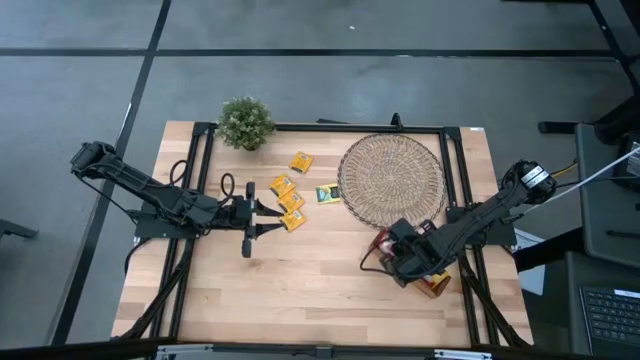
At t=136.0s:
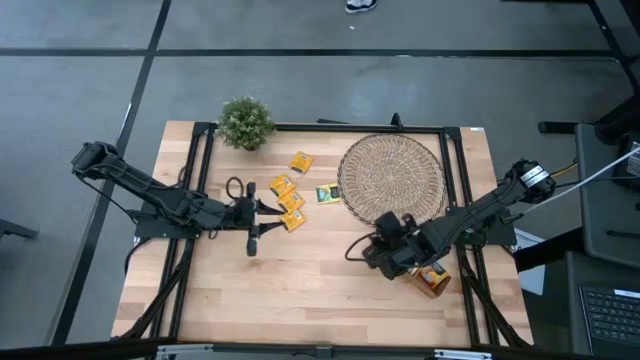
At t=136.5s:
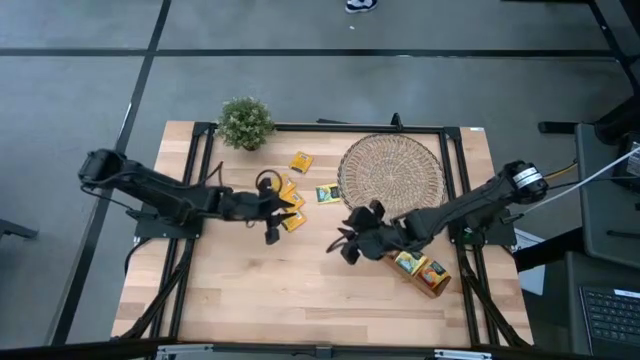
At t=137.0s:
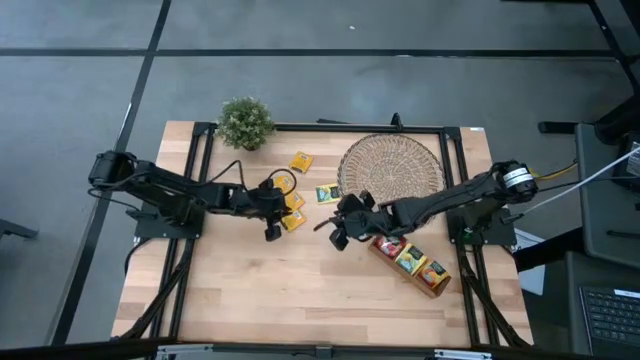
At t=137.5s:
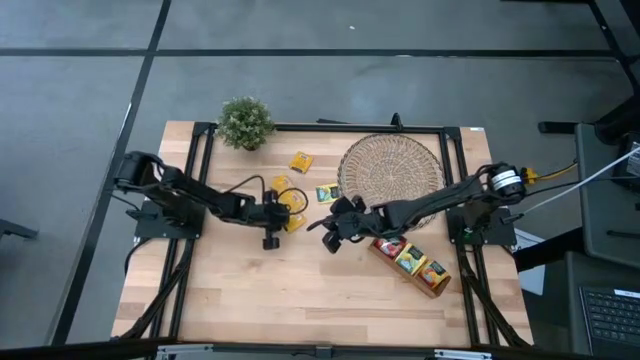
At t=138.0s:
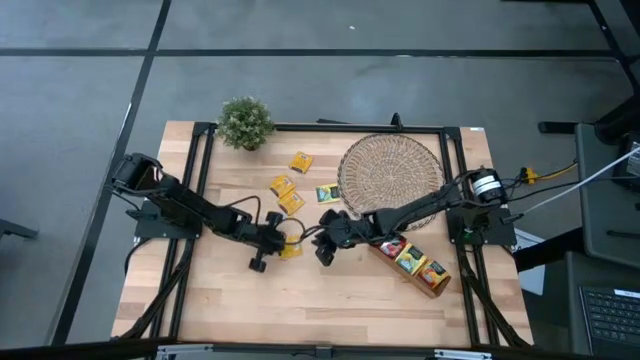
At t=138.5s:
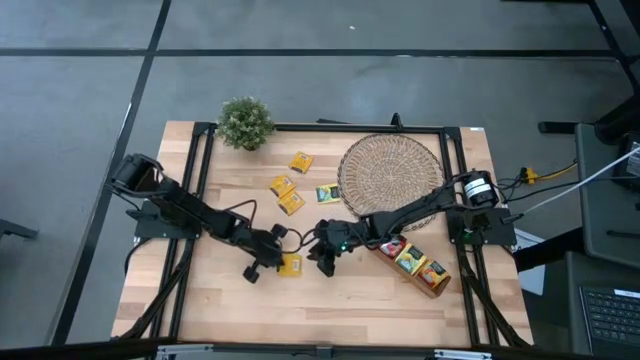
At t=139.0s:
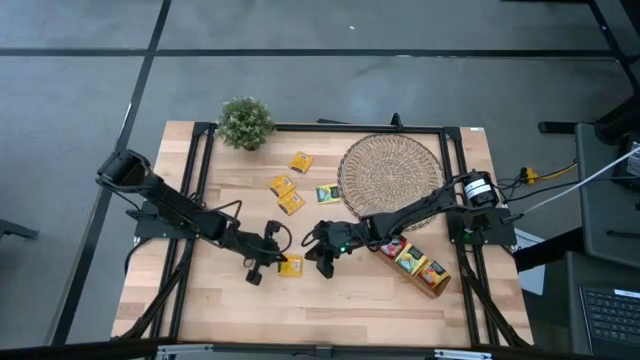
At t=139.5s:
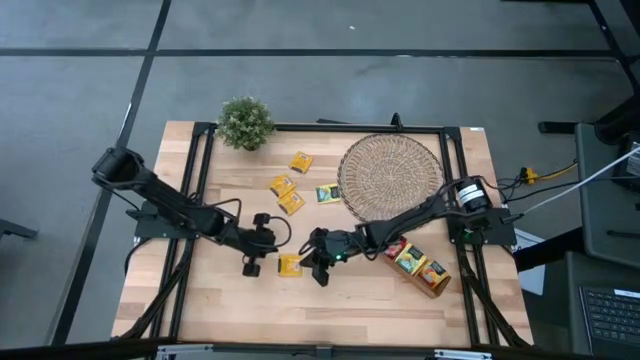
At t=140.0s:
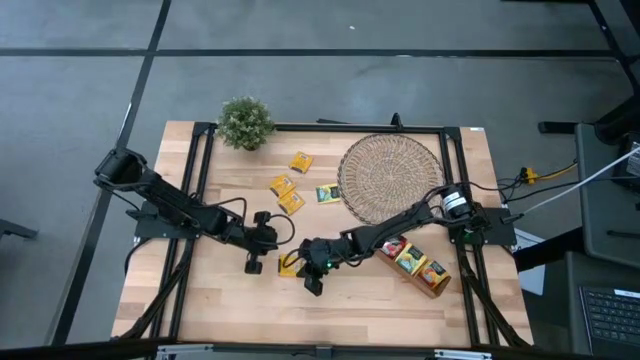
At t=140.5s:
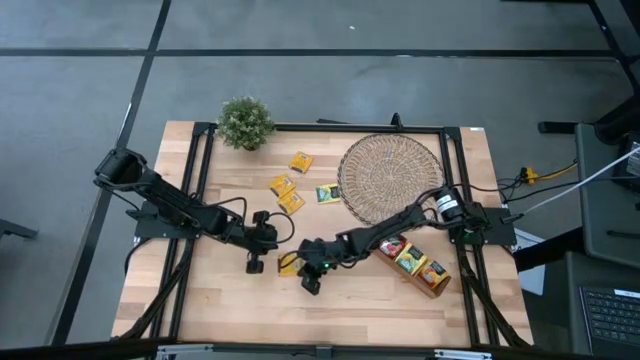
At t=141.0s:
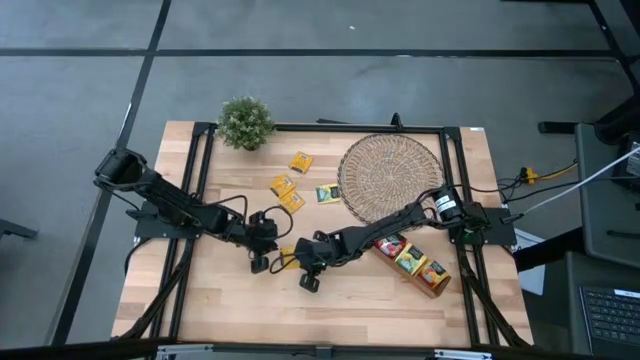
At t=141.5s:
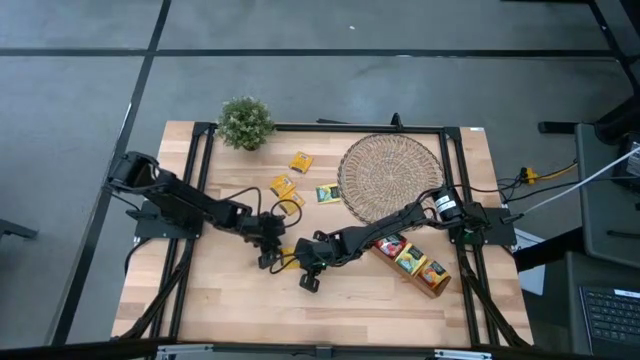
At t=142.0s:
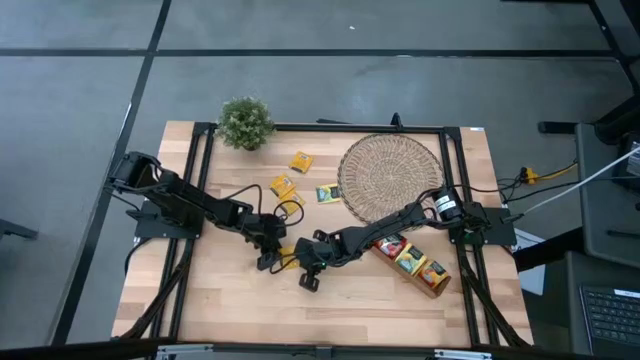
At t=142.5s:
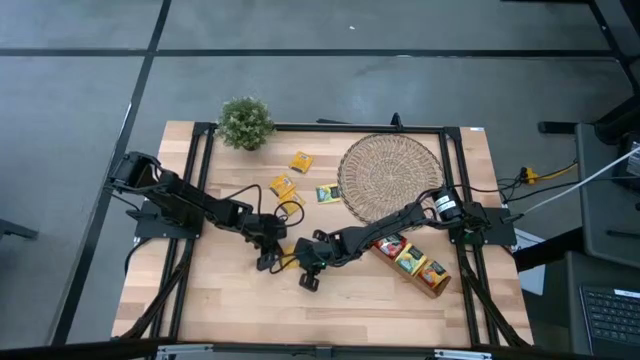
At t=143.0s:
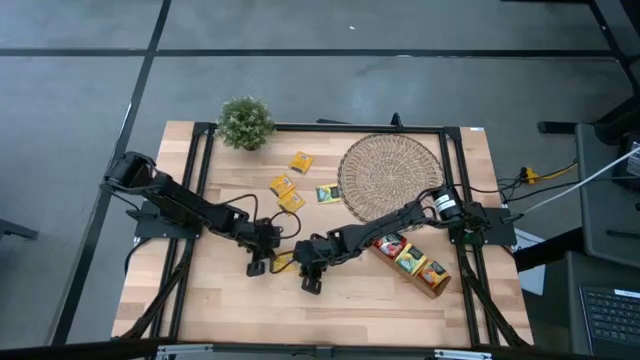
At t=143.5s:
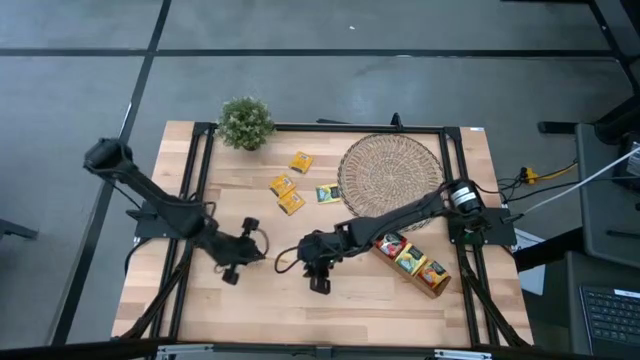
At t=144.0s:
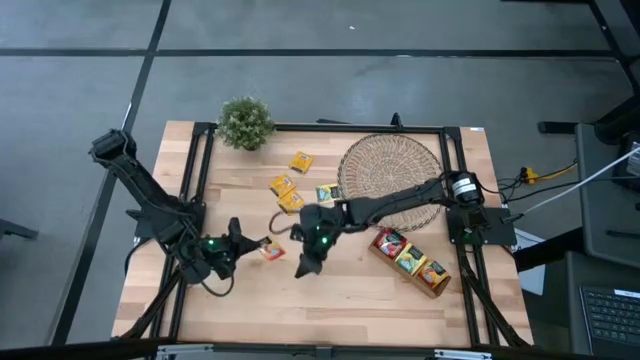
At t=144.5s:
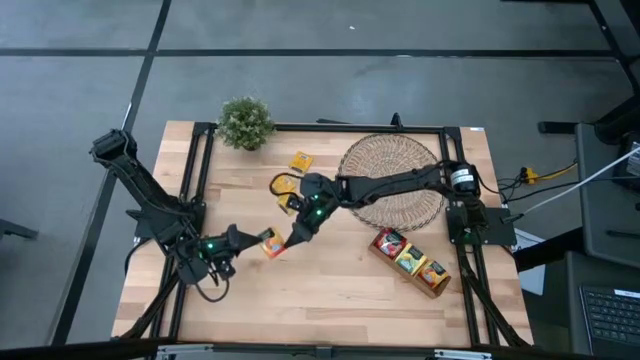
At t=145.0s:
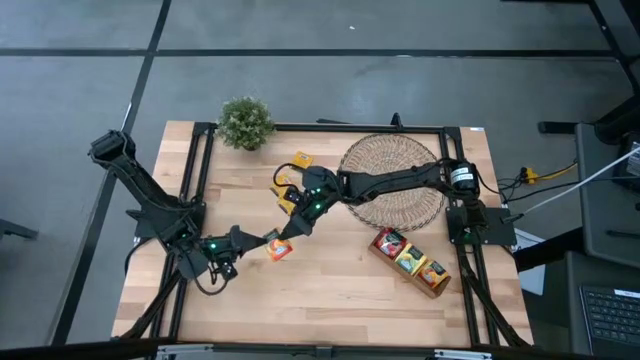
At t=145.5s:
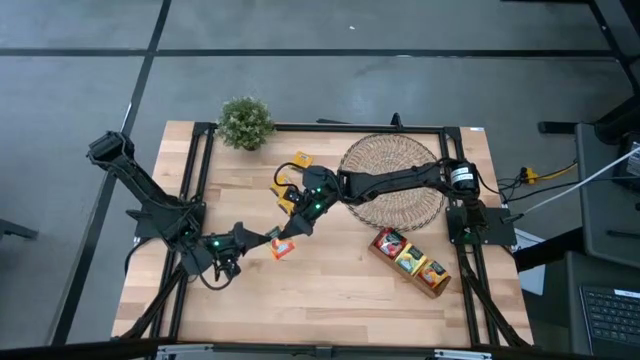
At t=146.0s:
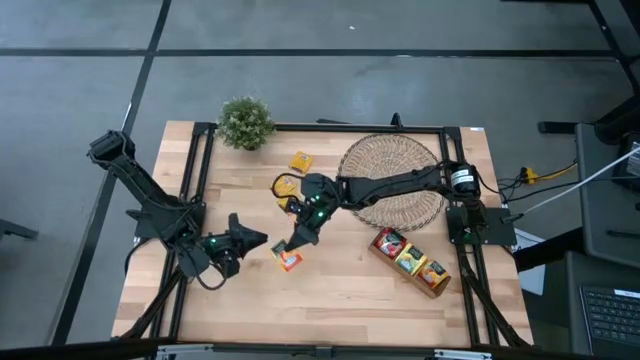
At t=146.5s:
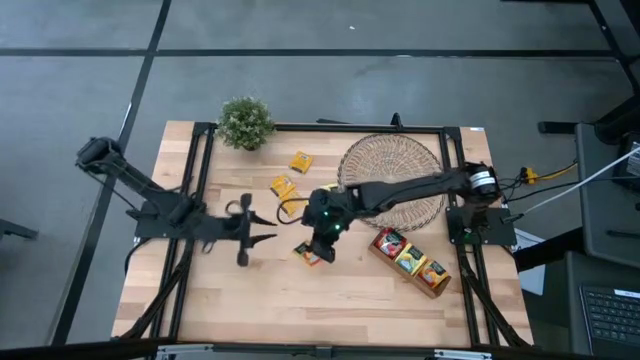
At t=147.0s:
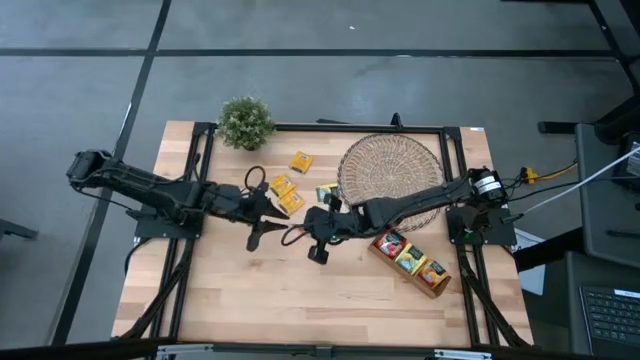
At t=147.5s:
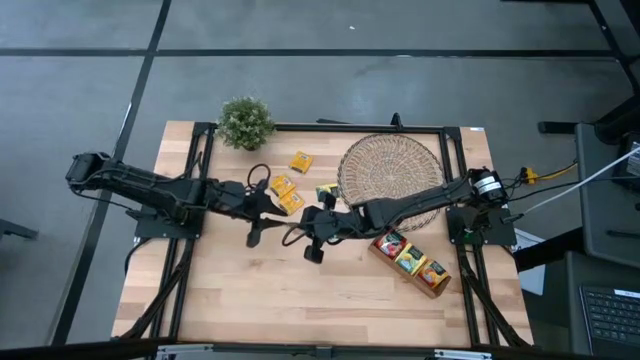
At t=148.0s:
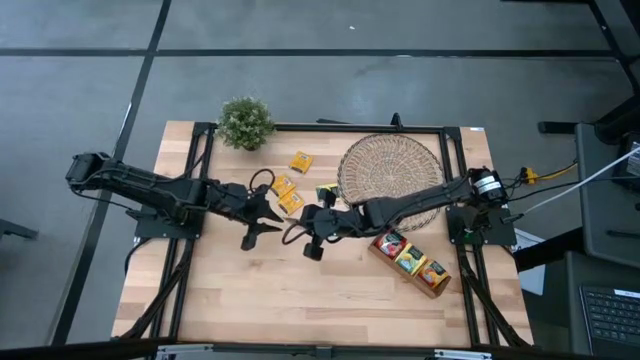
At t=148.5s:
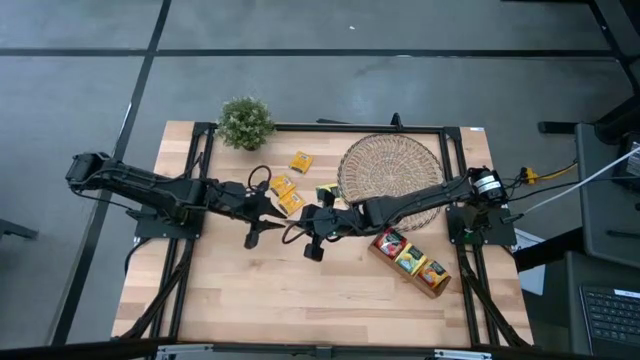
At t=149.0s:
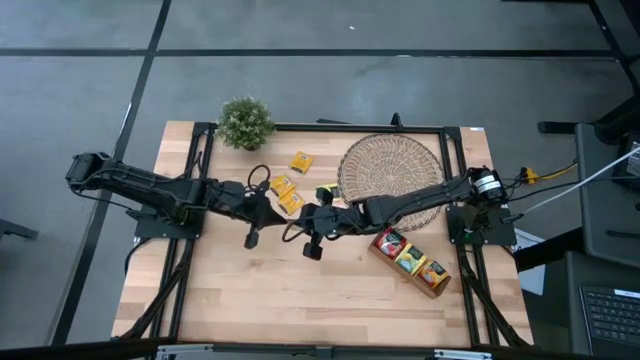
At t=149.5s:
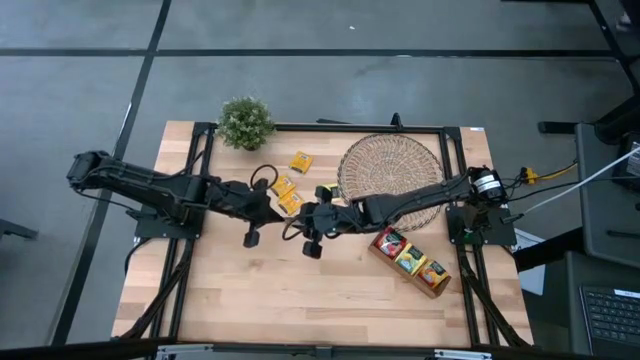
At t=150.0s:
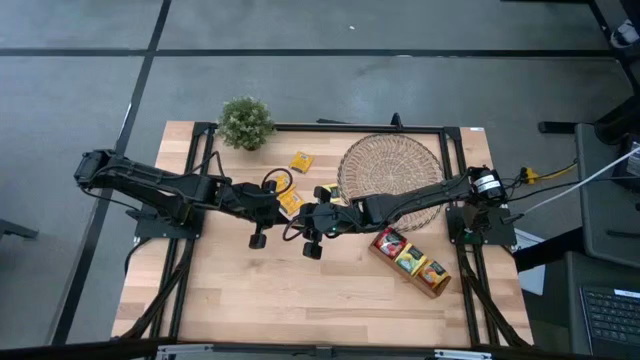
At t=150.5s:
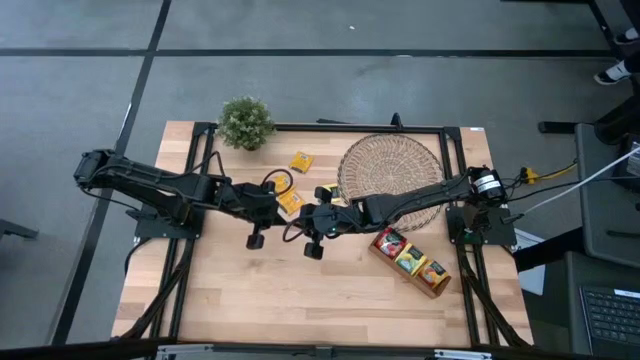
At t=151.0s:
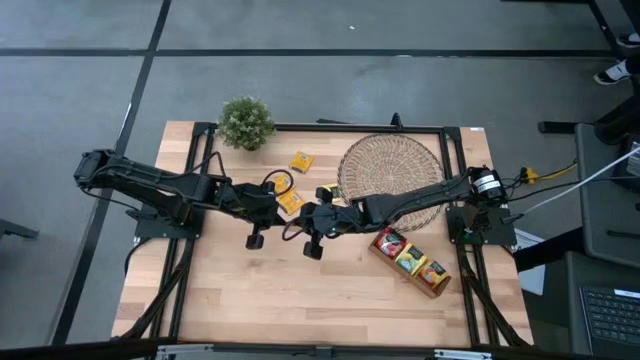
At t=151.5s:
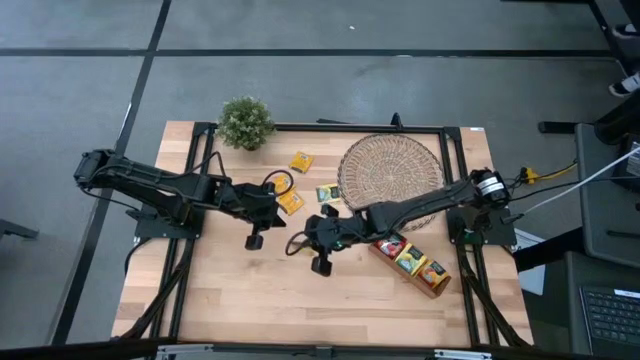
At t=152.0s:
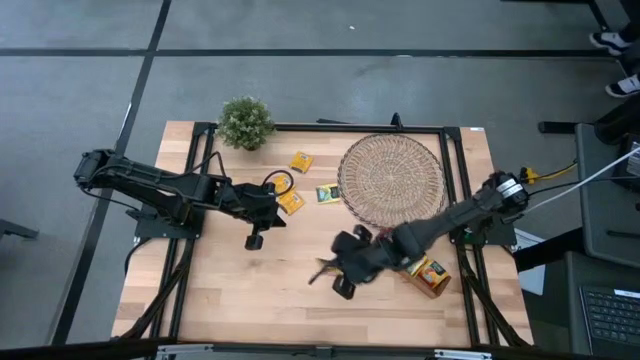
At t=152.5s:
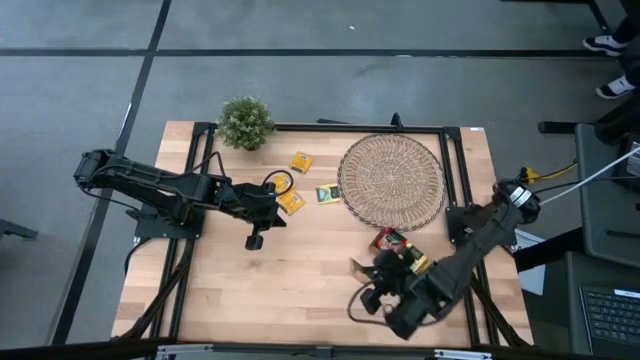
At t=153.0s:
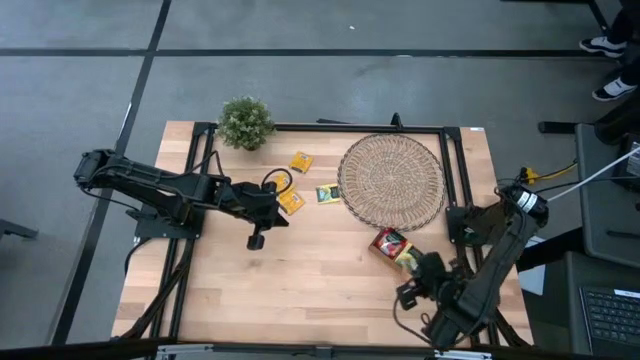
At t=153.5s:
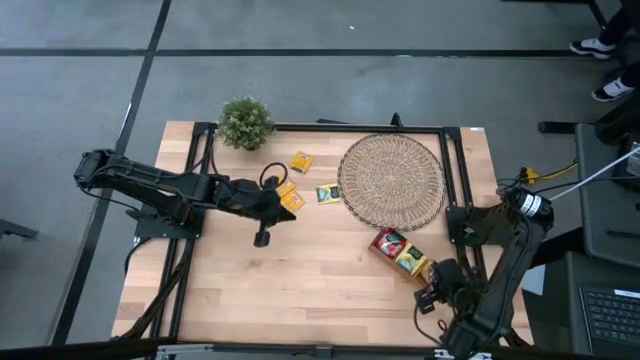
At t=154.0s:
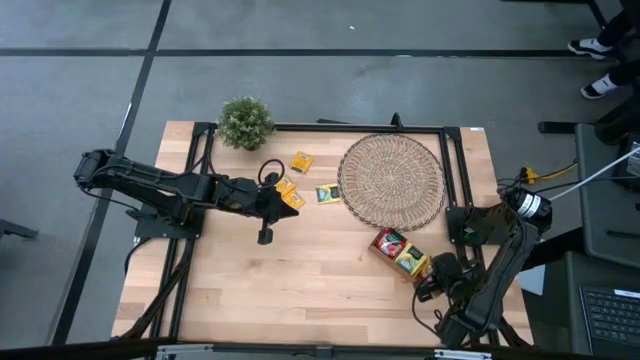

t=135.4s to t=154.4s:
Task: Pick & Place Tea
Put the orange tea bag into the right slot of the wooden organizer

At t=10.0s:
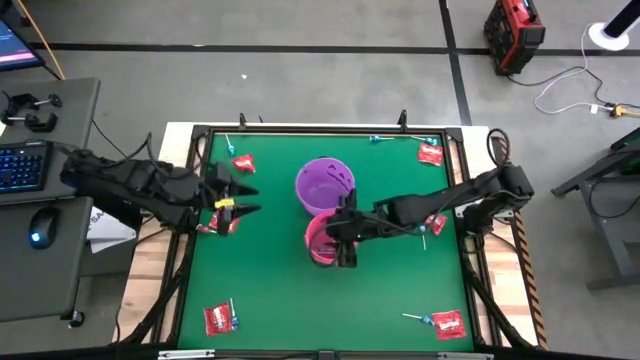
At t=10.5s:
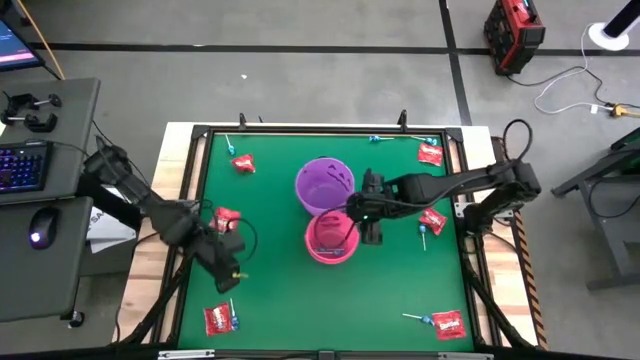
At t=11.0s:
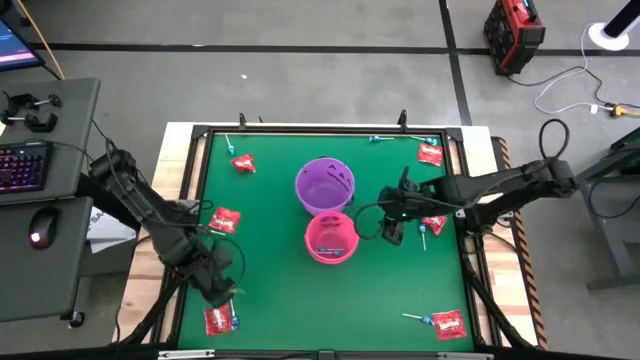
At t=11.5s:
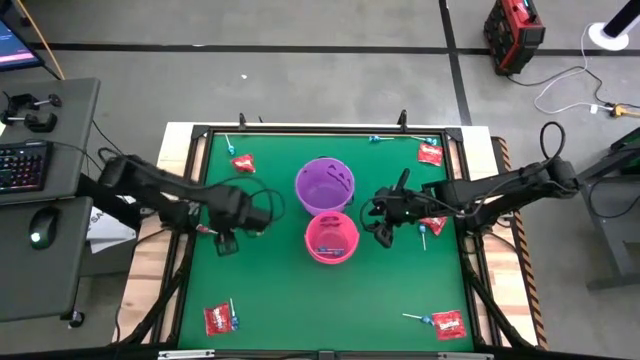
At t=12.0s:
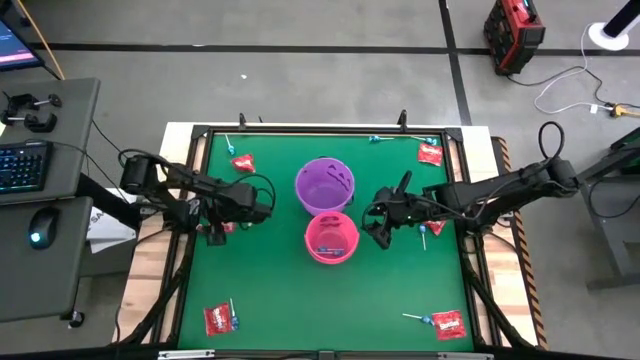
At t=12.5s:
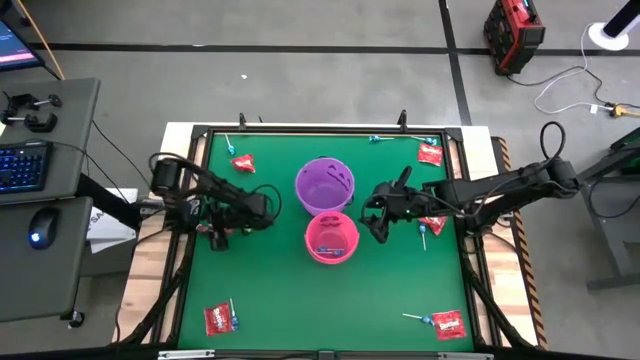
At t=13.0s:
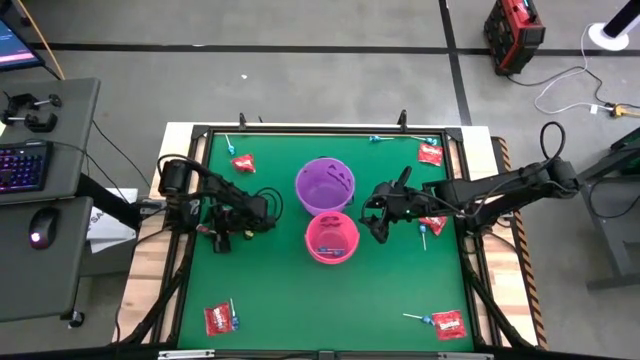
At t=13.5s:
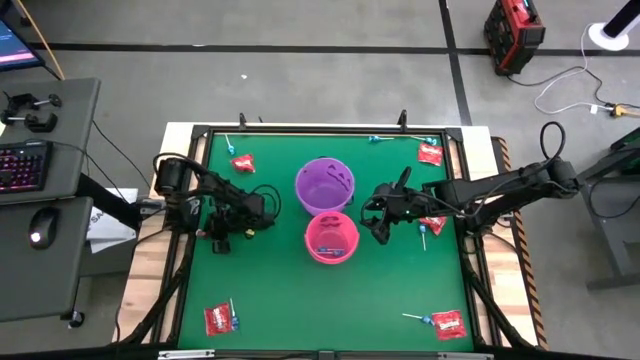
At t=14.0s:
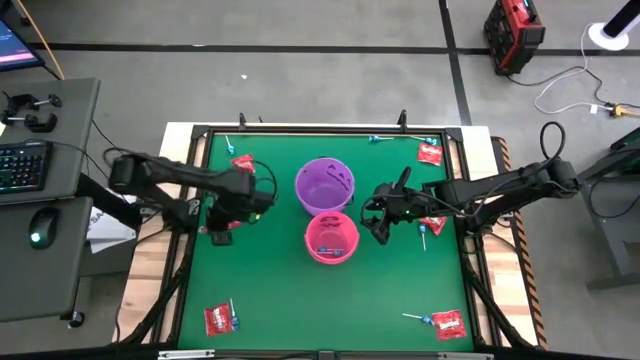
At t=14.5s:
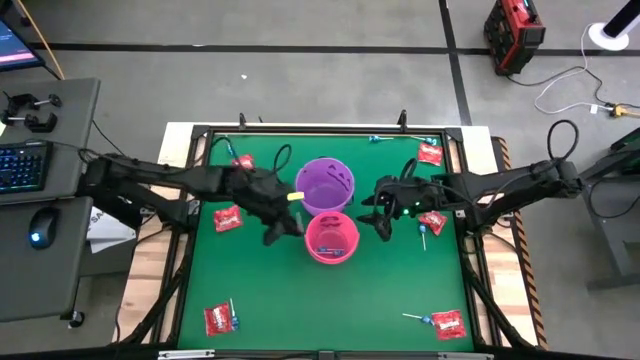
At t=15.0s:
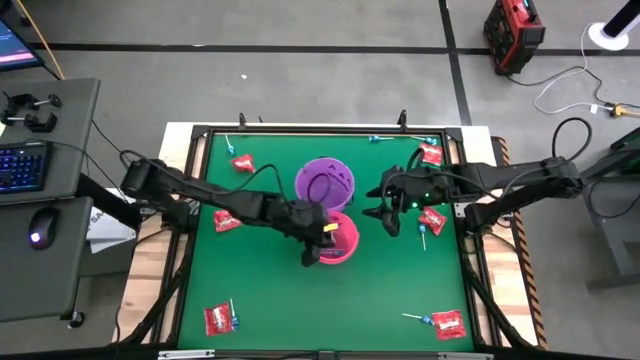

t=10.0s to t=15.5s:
Task: Sort candy by brand, put in halloween buckets
Put the red candy into the pink bucket
